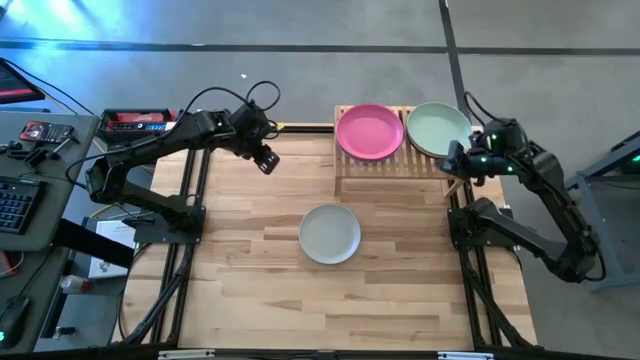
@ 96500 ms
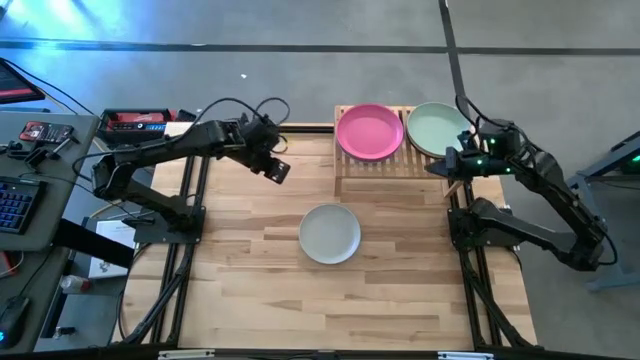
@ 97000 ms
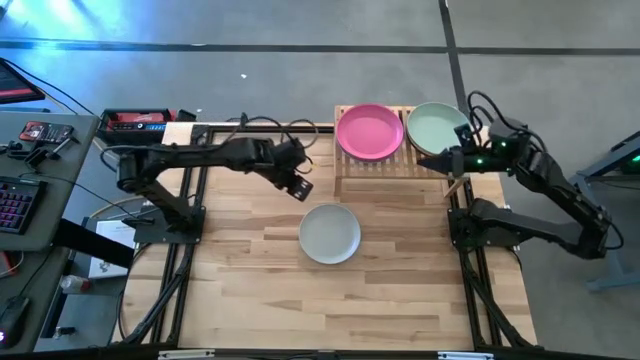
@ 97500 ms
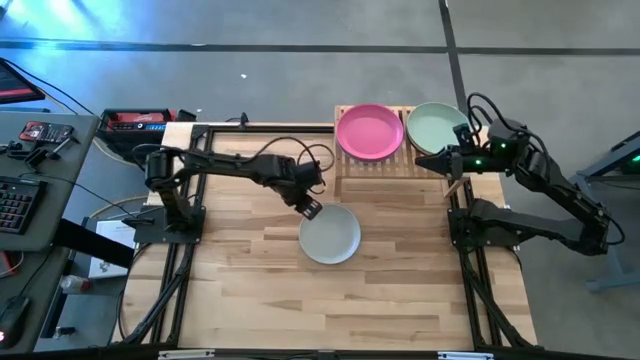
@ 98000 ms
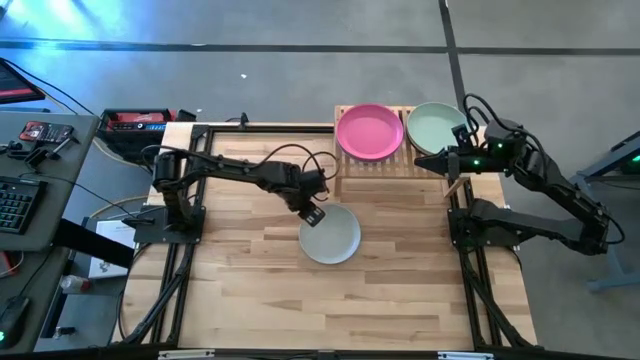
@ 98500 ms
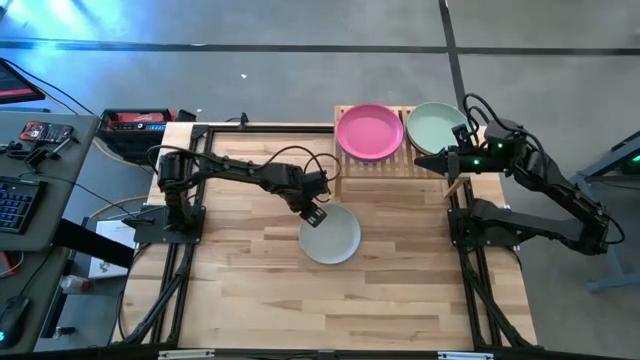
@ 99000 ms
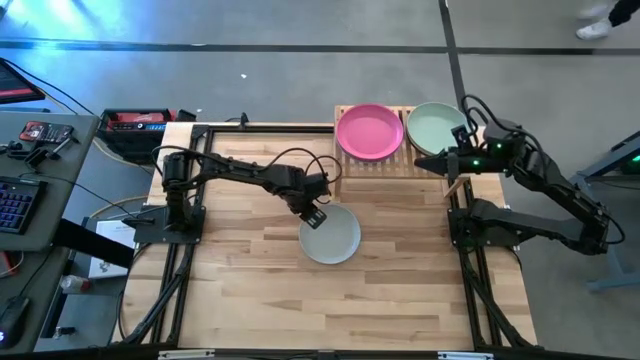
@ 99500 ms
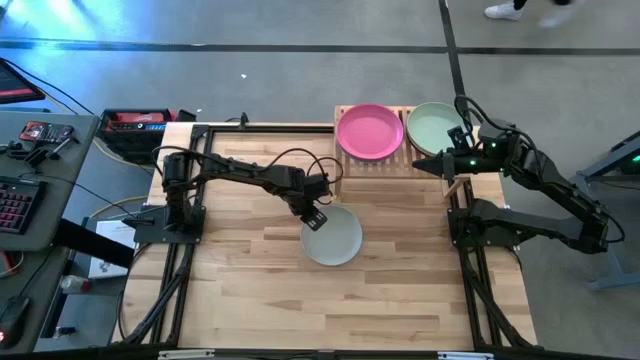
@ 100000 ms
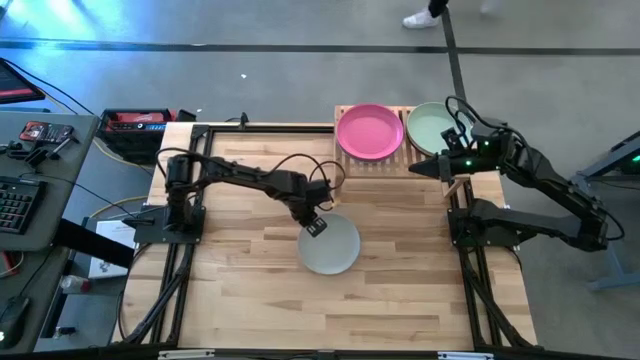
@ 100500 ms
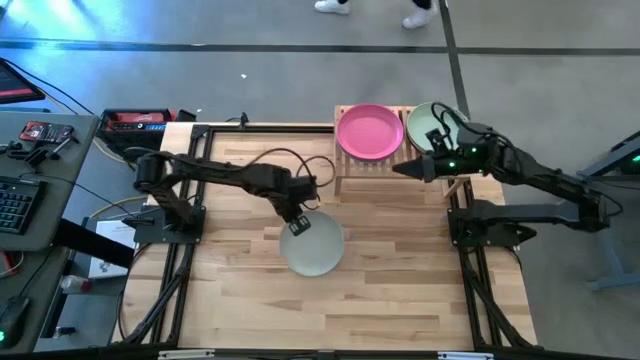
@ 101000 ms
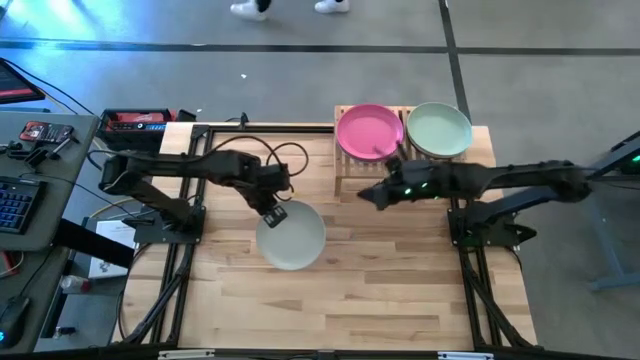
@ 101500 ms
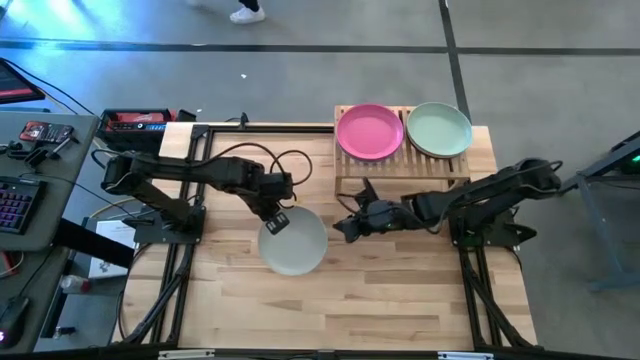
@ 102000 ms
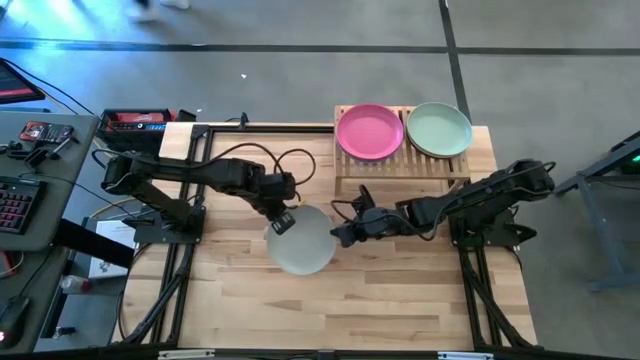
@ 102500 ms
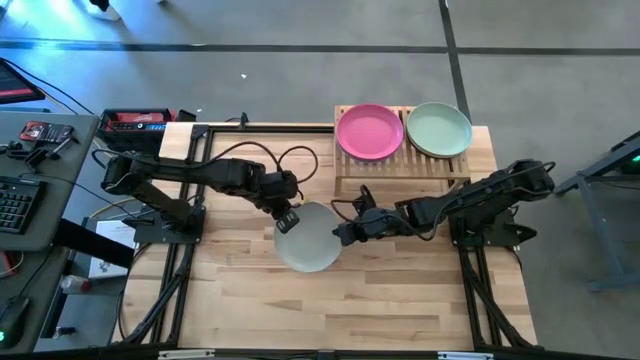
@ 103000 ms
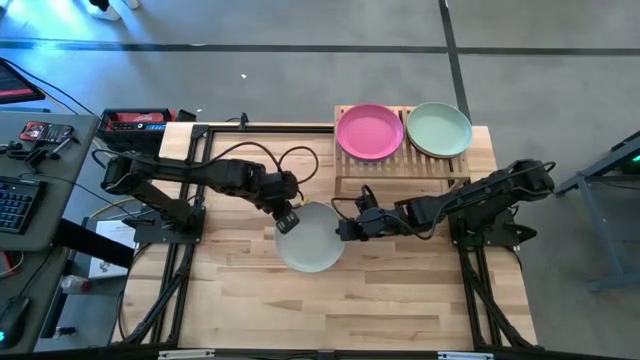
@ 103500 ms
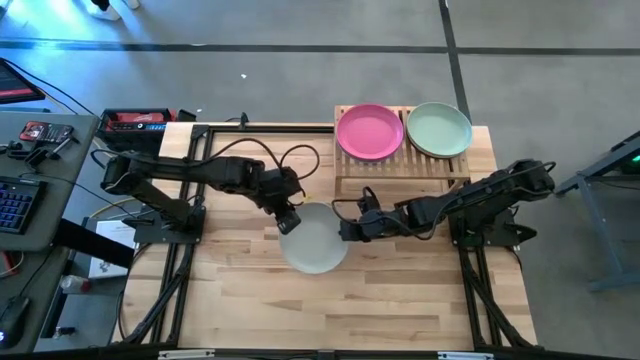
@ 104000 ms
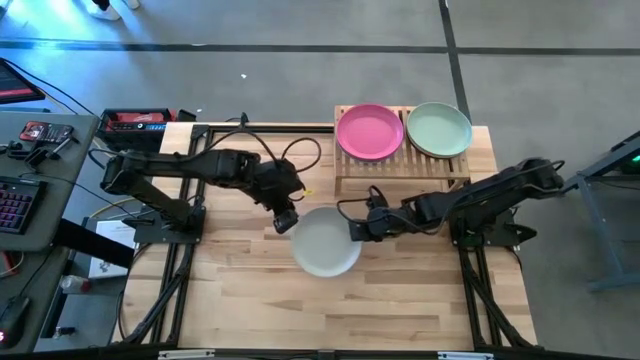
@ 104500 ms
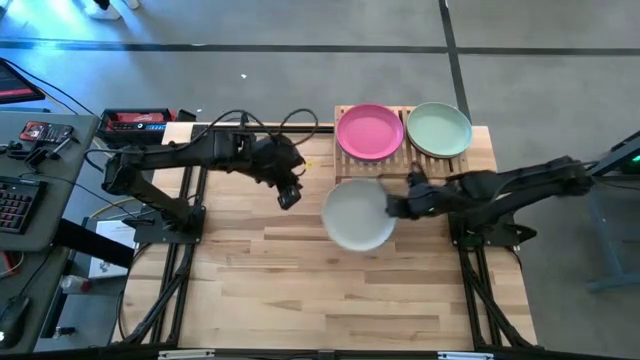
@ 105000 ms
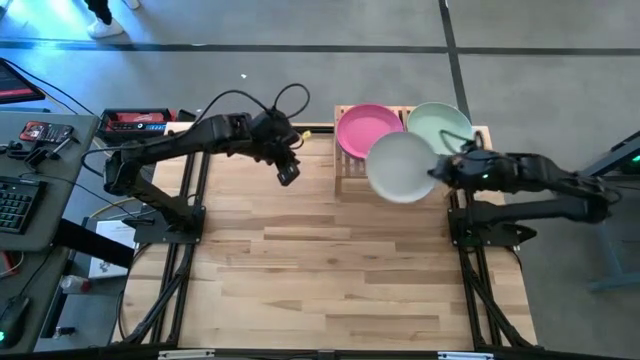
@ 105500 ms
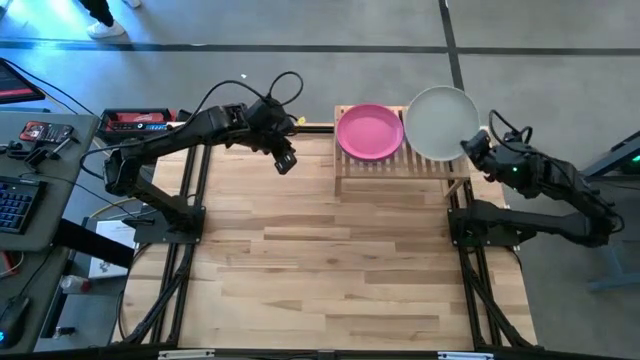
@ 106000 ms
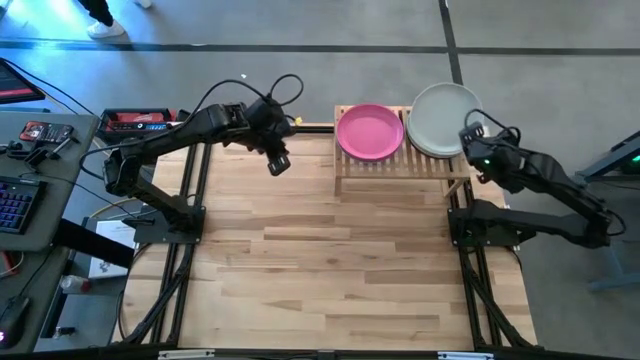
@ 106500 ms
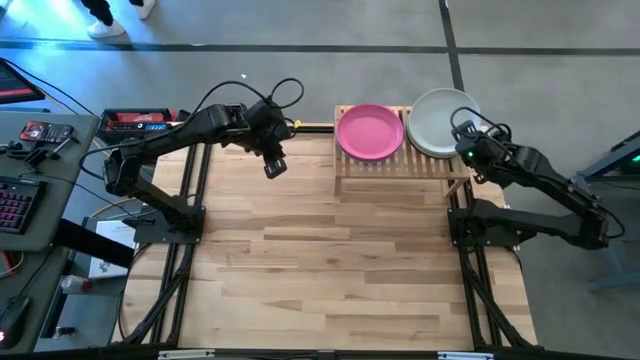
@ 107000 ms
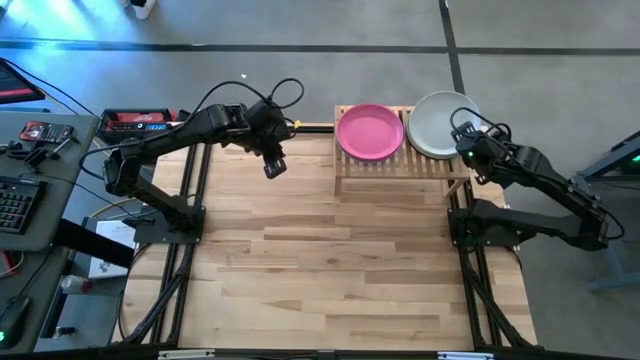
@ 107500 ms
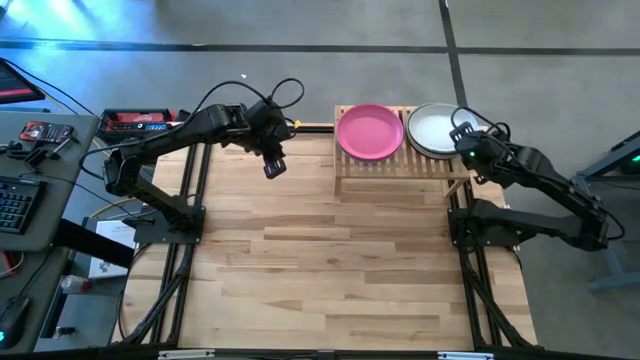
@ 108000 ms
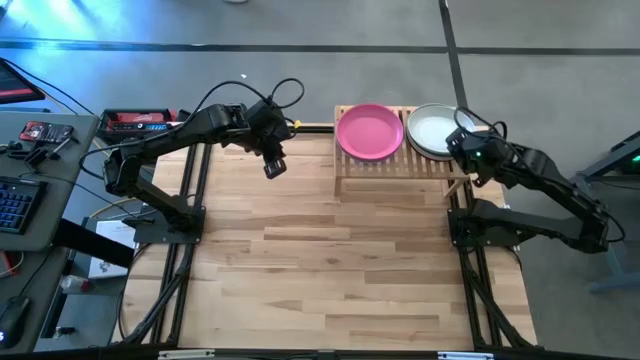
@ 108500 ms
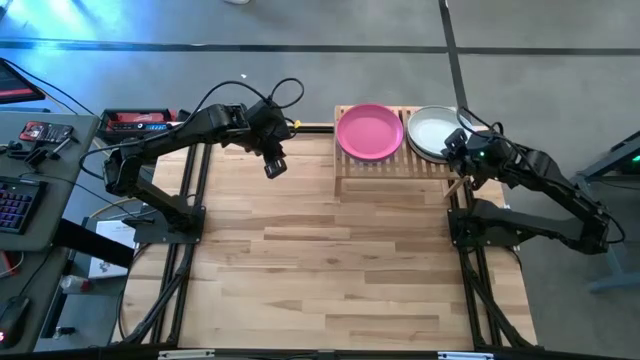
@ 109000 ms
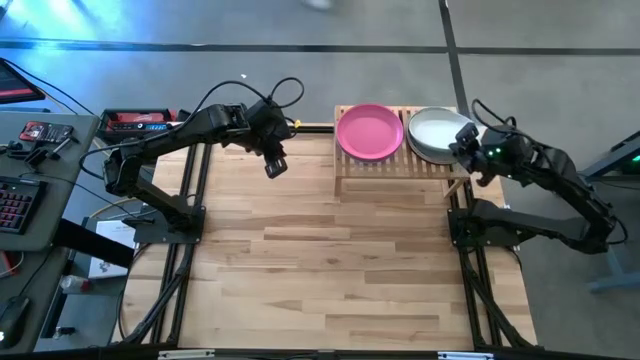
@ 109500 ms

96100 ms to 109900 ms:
Task: Place and stack plates onto a shelf
Stack the gray plate on top of the green plate on the shelf

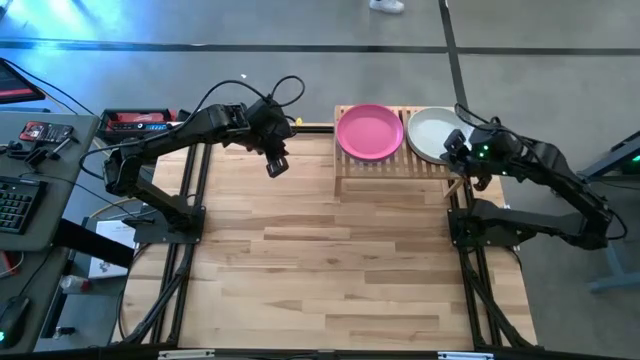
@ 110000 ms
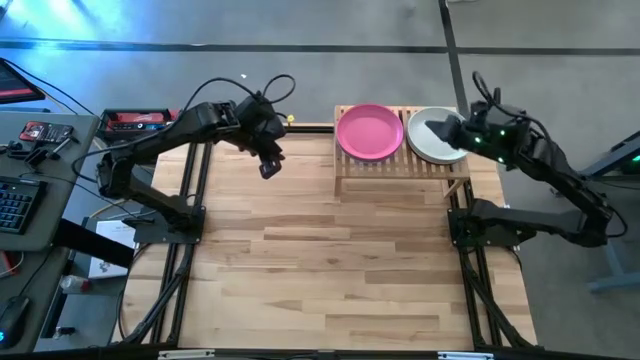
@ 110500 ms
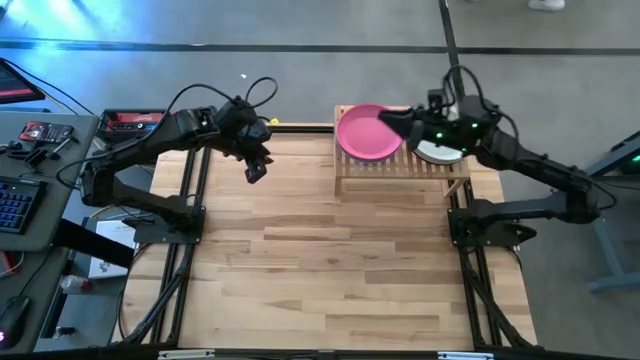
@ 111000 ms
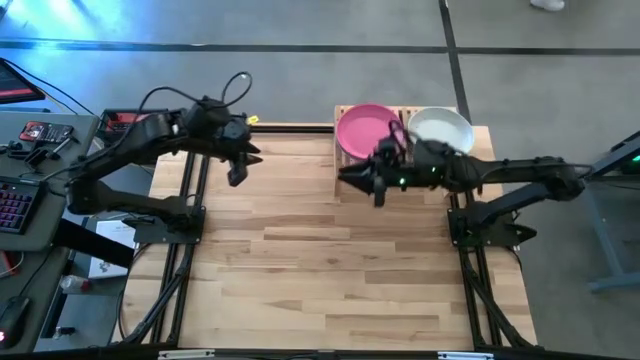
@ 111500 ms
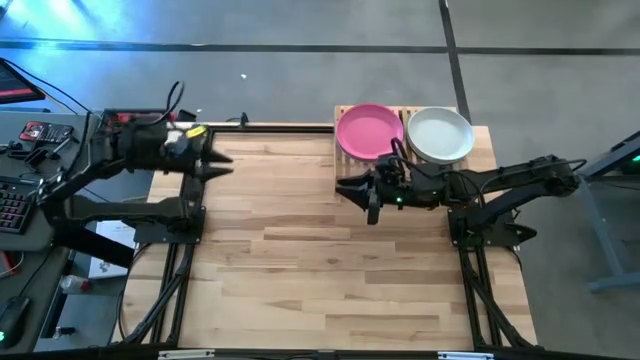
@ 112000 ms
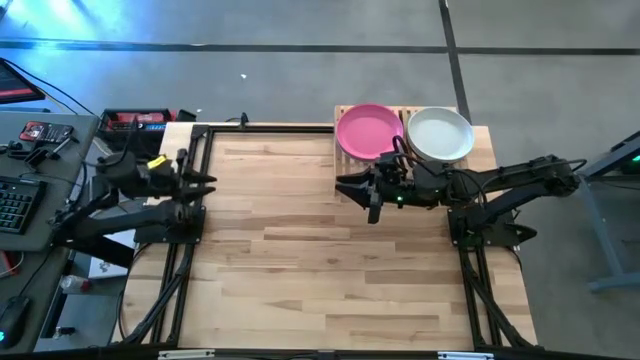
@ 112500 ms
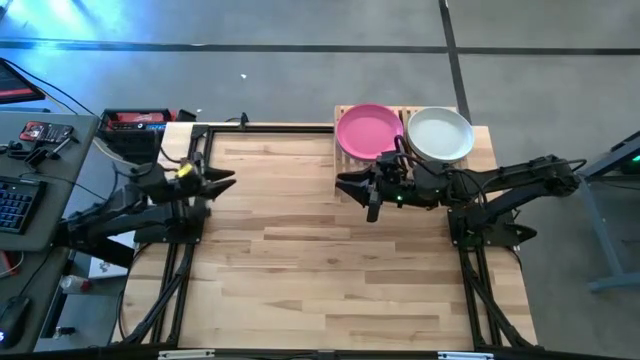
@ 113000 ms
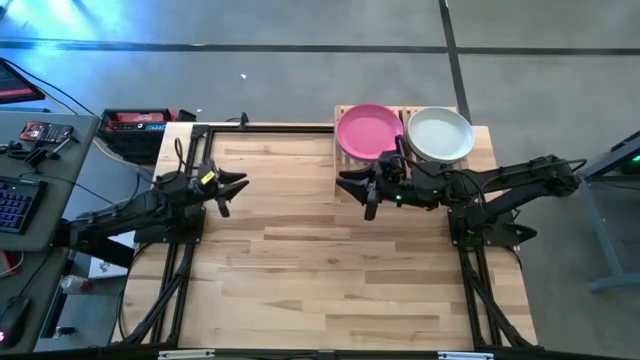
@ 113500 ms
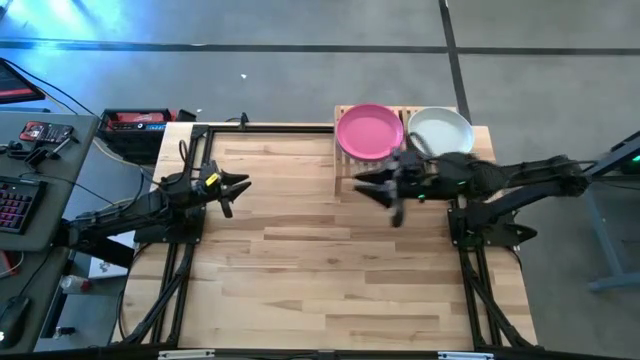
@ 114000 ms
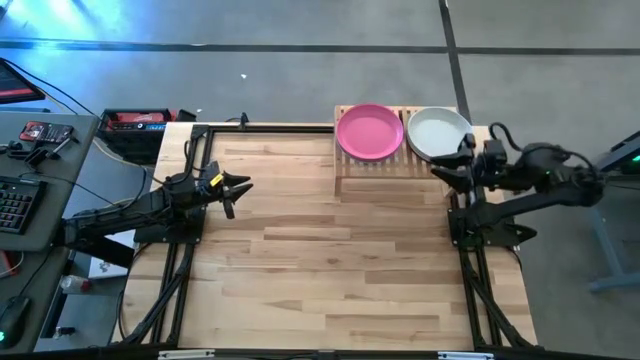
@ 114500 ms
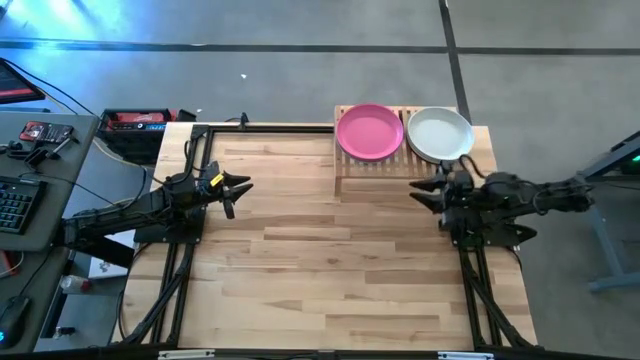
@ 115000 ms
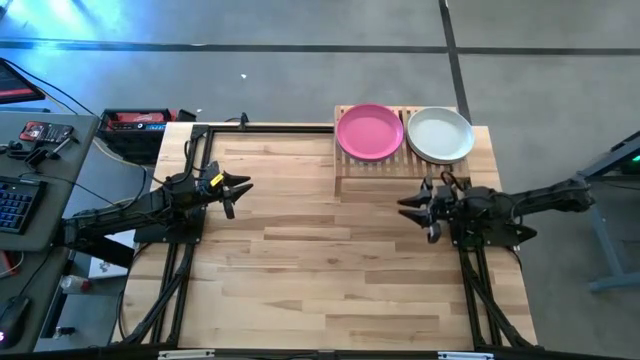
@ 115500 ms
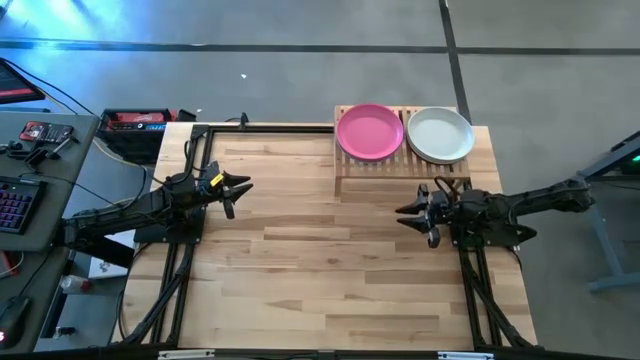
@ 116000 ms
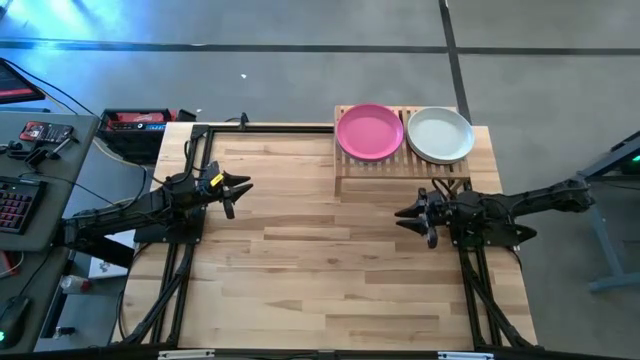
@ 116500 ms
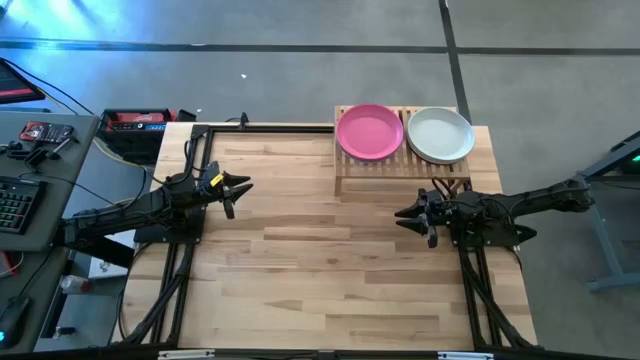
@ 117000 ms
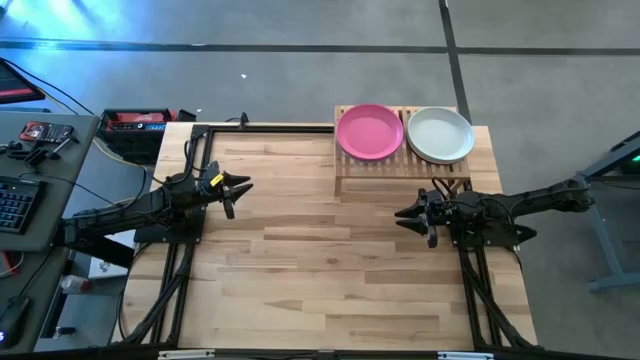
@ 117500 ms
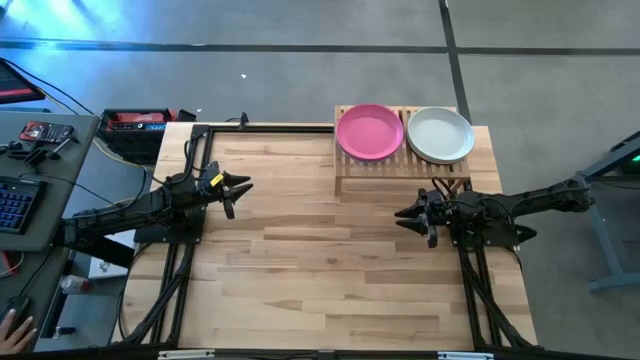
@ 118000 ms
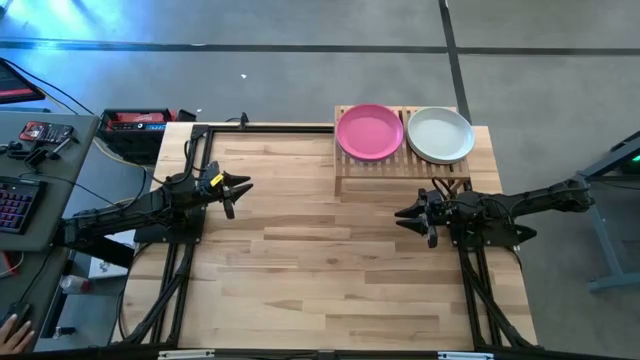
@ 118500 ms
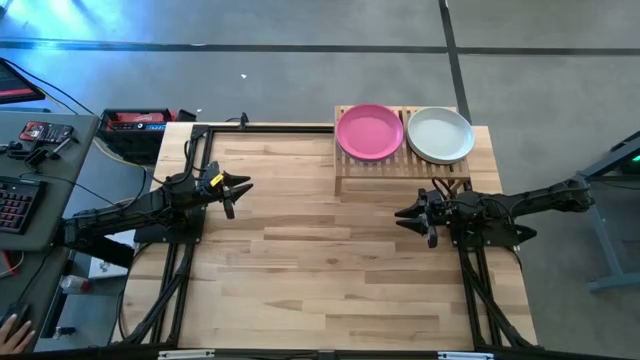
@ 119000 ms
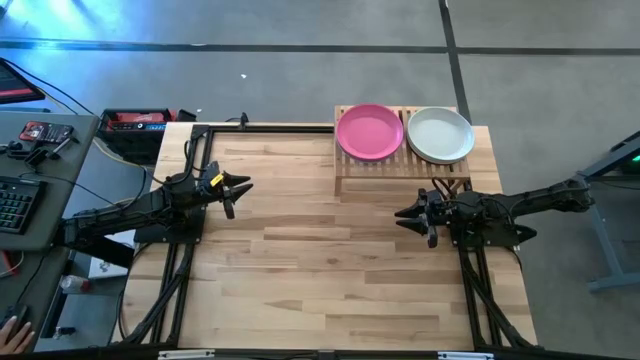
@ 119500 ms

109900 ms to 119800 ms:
Return to Home Position
